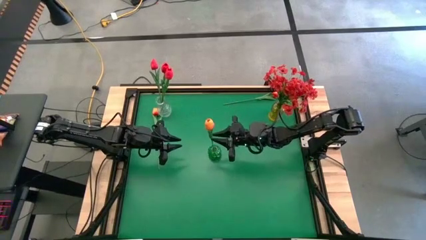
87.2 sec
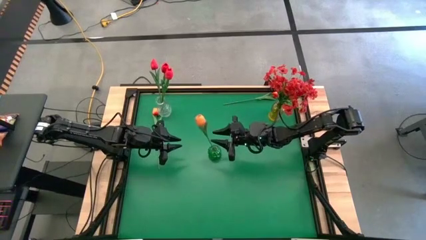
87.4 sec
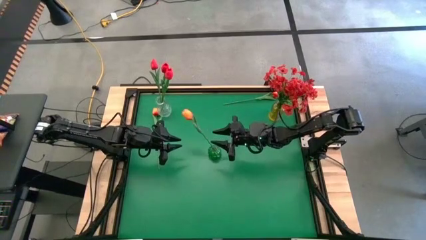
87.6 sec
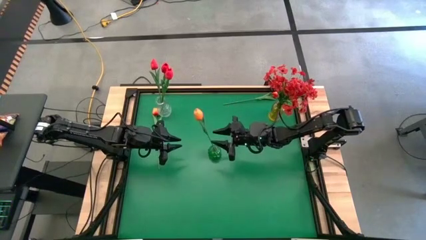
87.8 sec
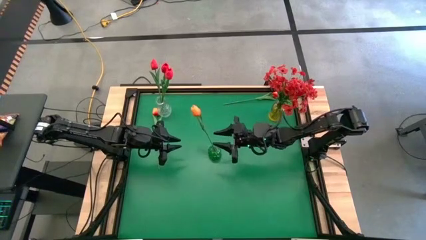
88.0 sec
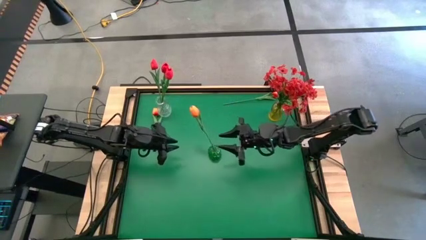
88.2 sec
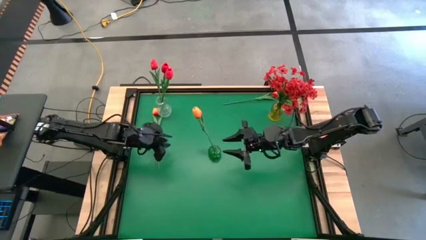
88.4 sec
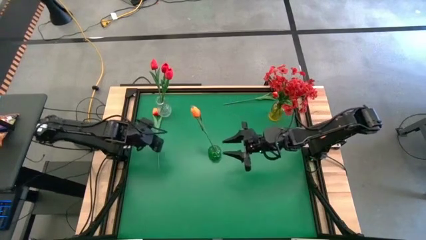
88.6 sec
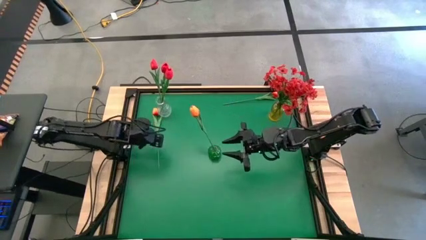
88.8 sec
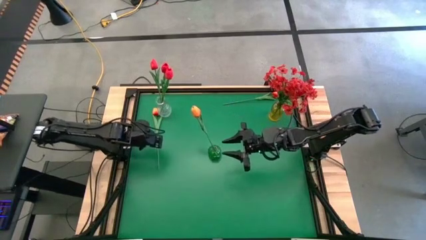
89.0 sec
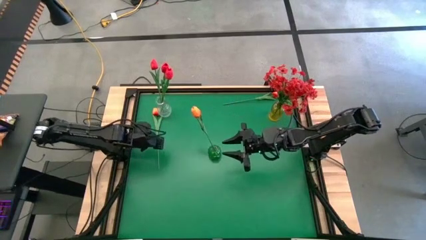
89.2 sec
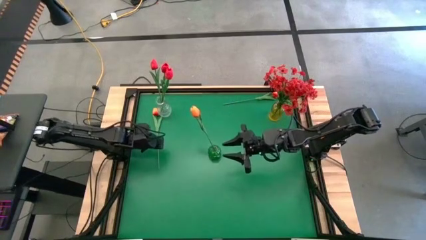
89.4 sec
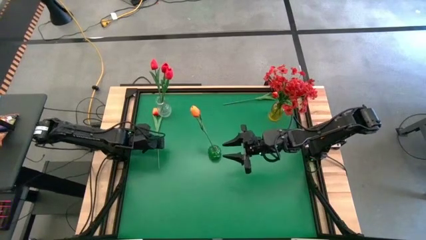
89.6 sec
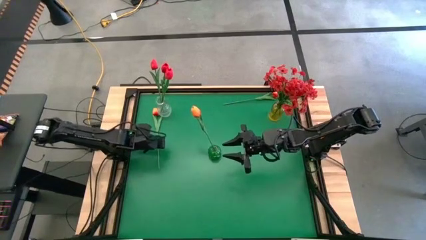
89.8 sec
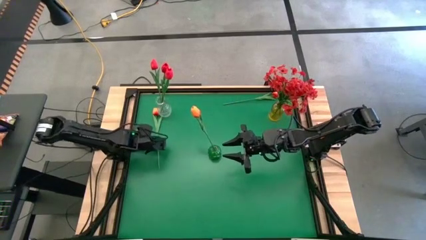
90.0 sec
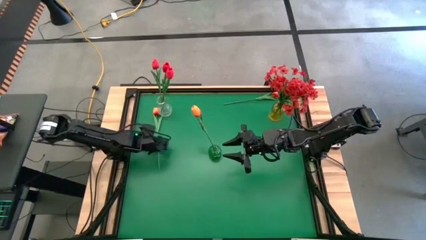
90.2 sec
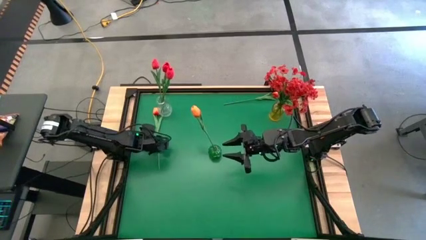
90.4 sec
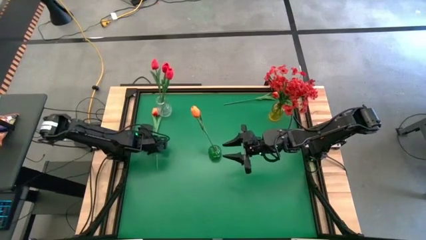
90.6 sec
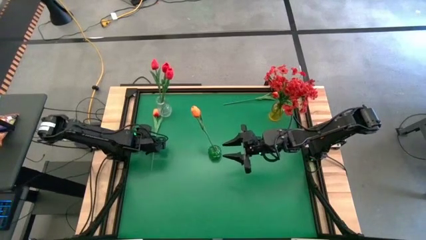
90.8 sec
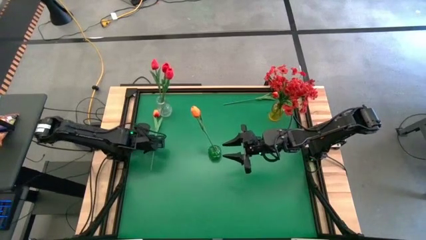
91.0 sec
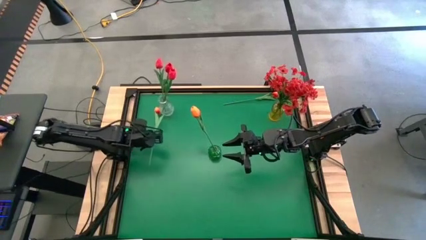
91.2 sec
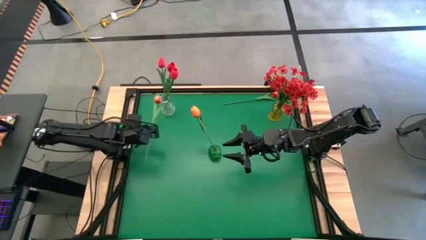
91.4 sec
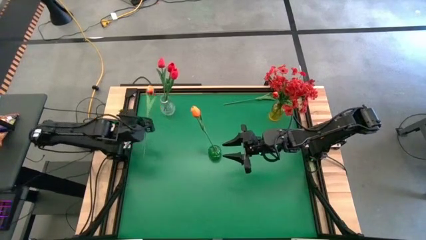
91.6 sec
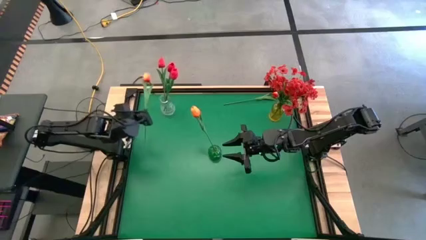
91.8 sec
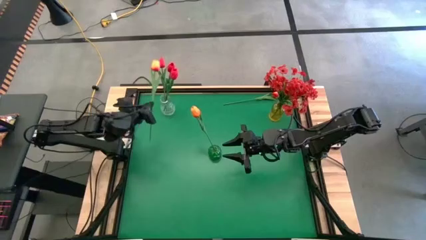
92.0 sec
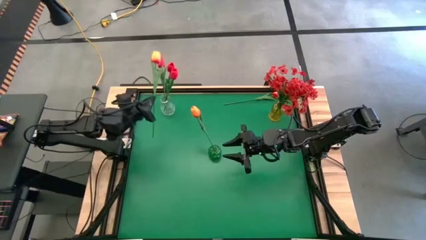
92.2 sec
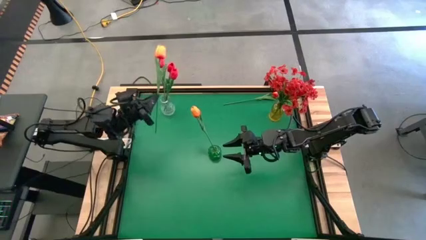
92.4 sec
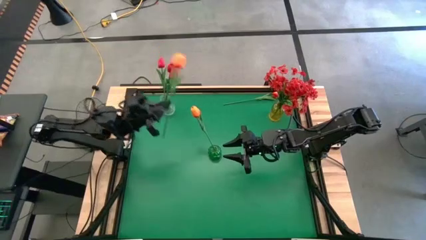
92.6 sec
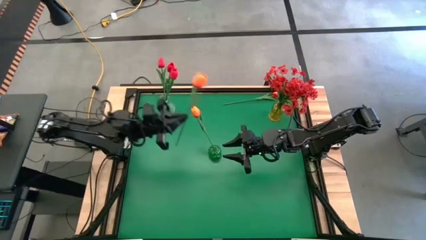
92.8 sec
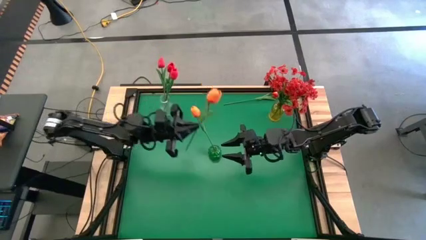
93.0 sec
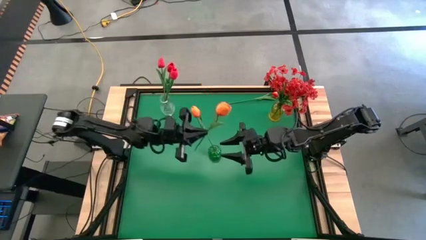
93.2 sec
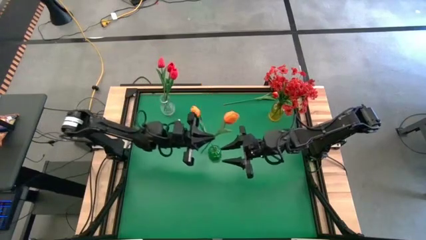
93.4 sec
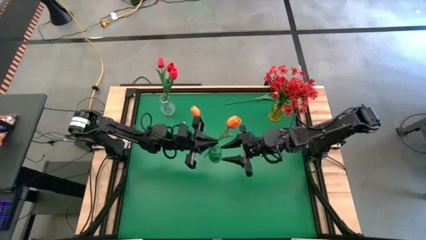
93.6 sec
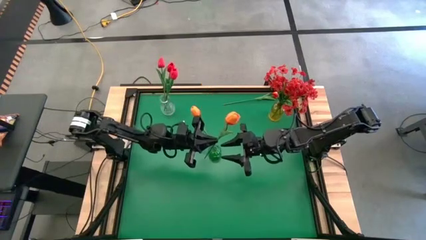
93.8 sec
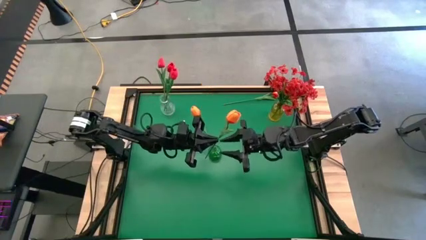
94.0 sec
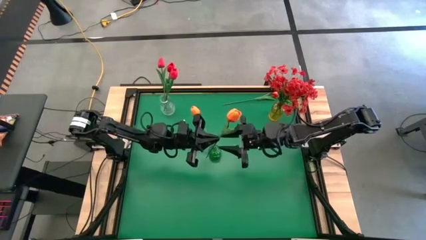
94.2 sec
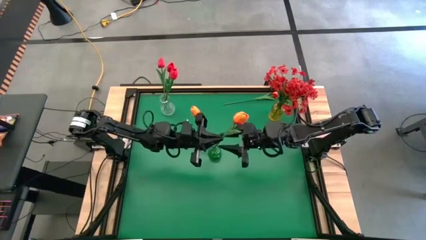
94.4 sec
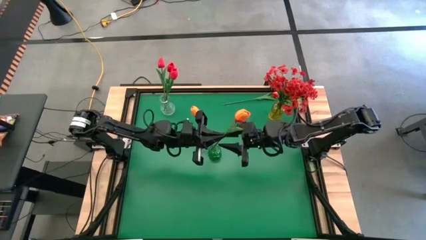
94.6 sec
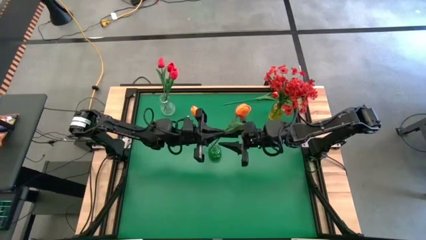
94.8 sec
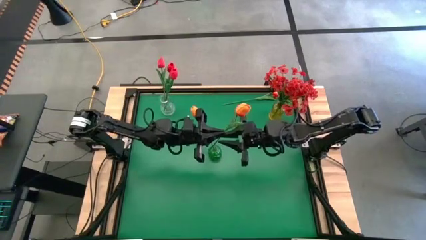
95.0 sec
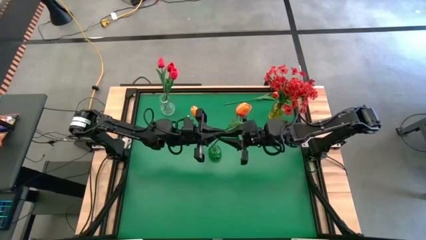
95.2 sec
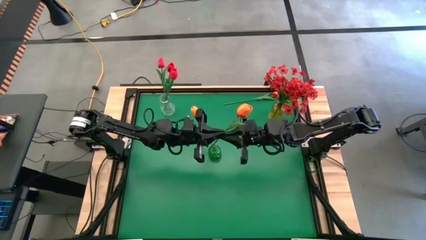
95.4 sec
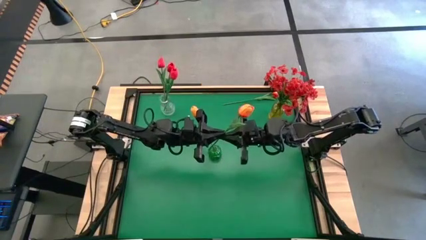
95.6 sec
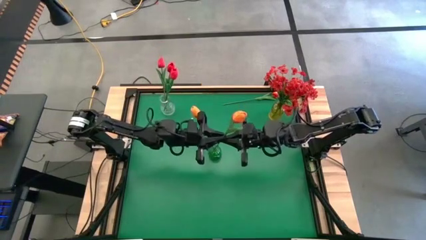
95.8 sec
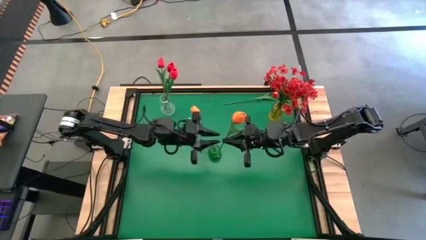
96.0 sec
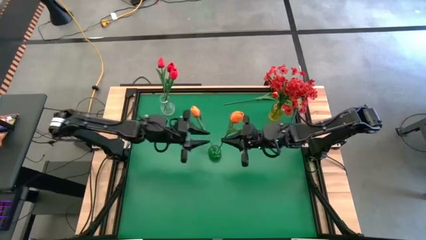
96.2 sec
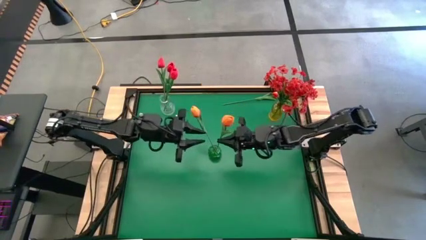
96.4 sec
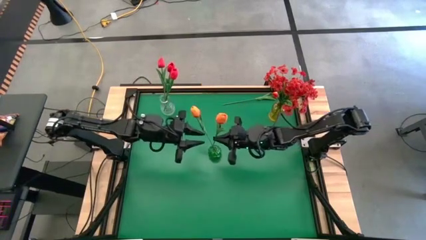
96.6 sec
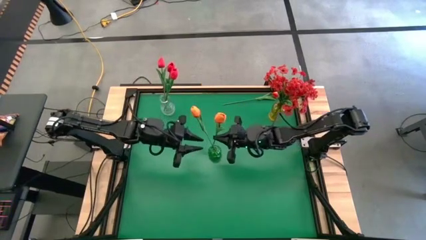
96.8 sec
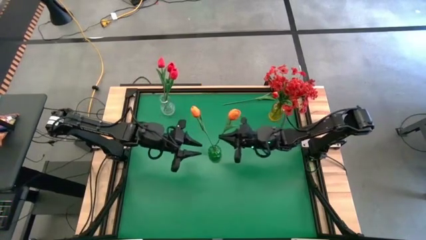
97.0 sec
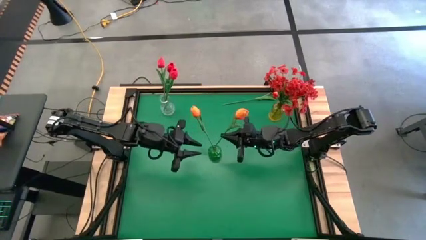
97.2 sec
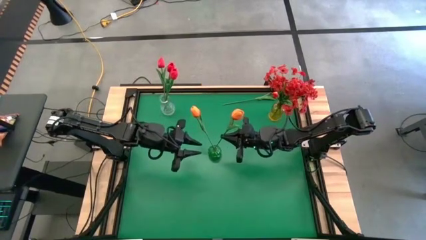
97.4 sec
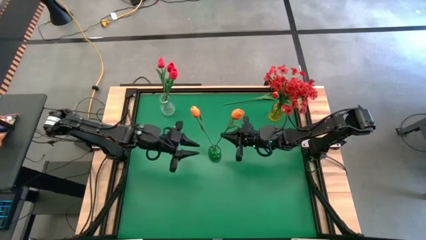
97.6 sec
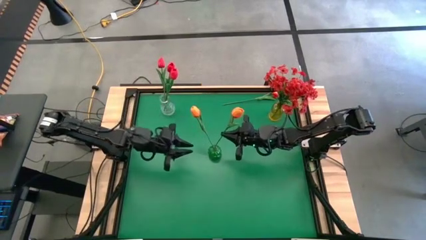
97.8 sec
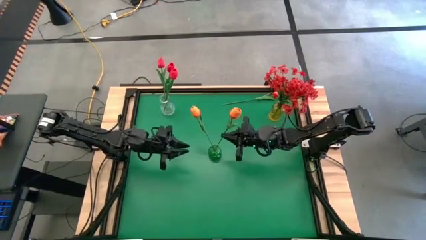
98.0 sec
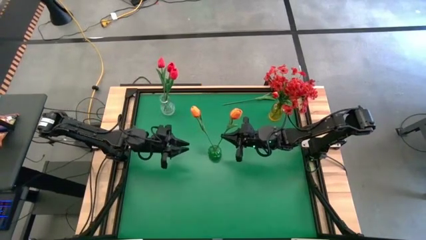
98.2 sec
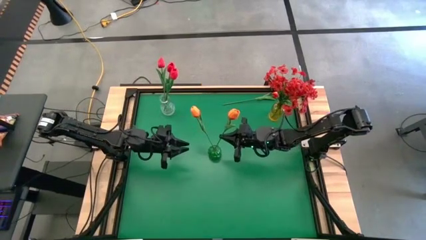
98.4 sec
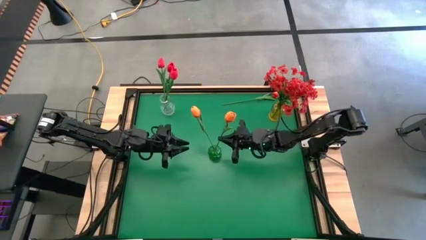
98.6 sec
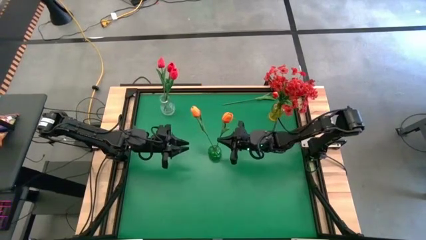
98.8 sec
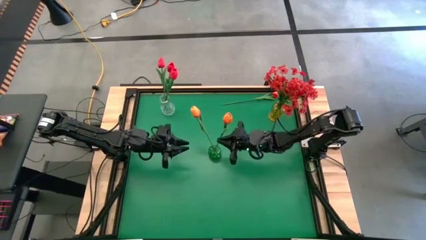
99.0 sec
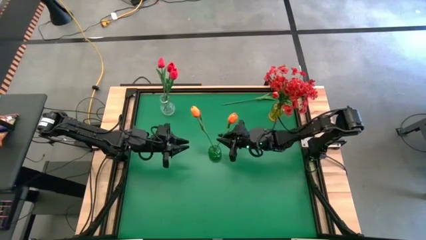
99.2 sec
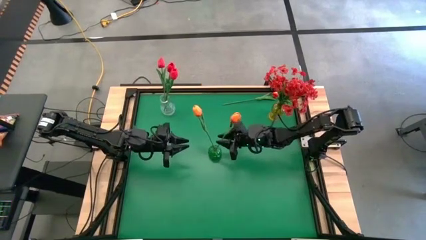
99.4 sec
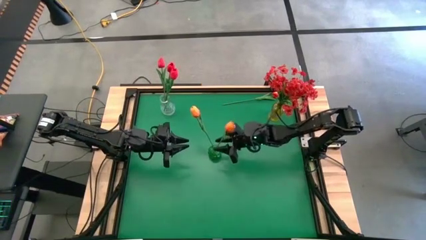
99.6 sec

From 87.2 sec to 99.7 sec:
Task: Sort flowers into vase by color
Put the left orange tulip into the green vase

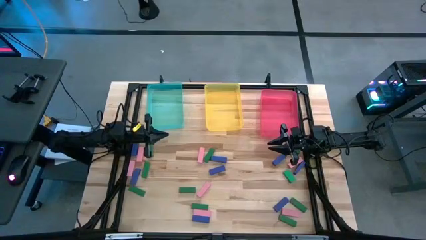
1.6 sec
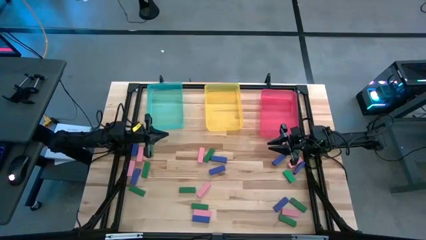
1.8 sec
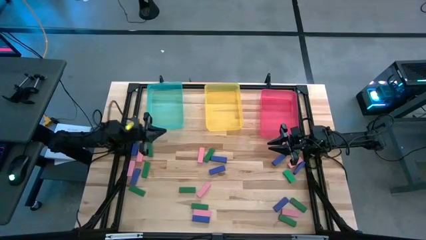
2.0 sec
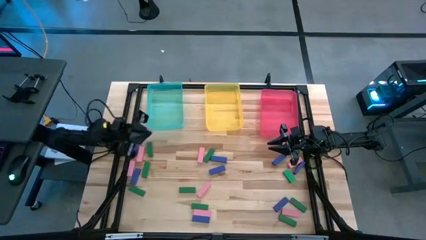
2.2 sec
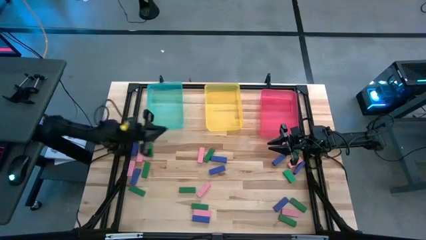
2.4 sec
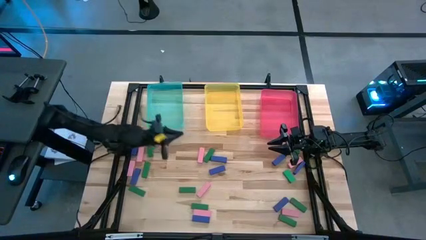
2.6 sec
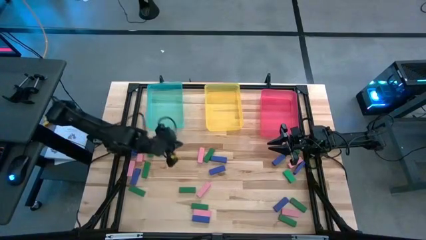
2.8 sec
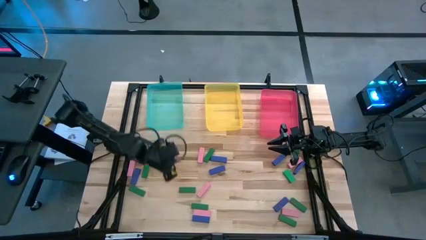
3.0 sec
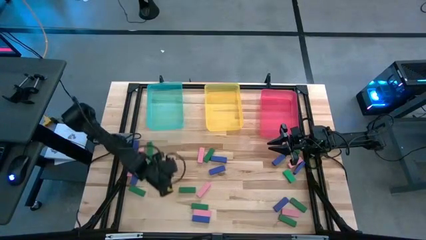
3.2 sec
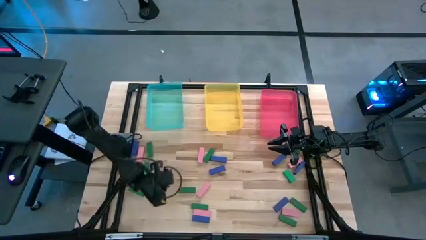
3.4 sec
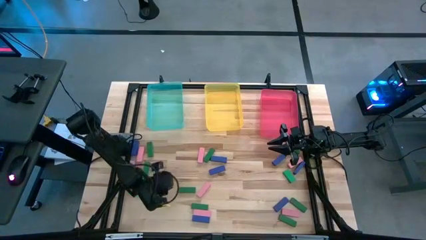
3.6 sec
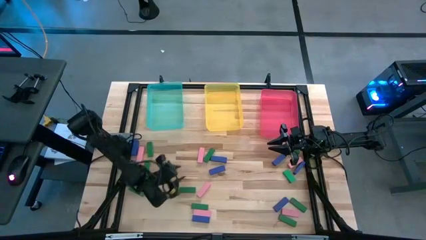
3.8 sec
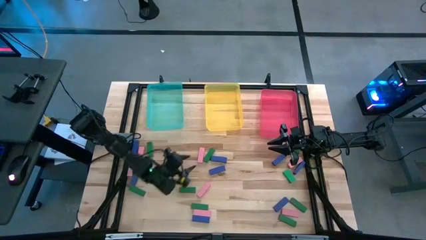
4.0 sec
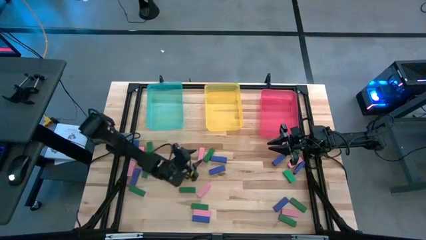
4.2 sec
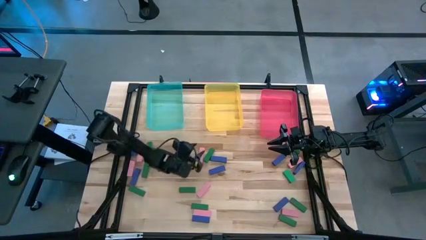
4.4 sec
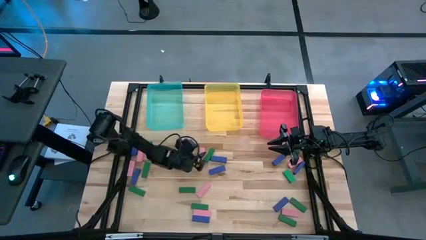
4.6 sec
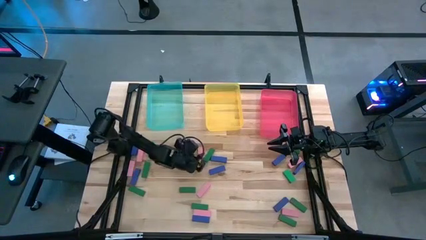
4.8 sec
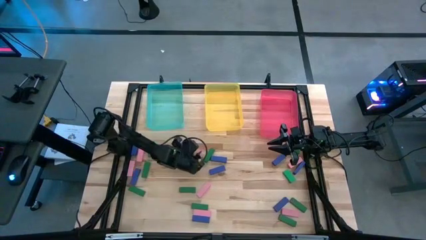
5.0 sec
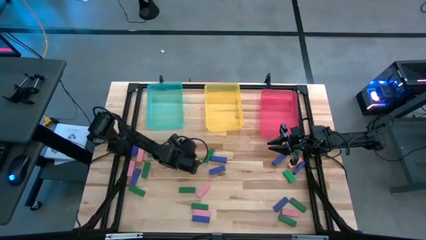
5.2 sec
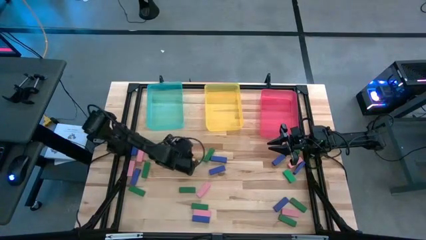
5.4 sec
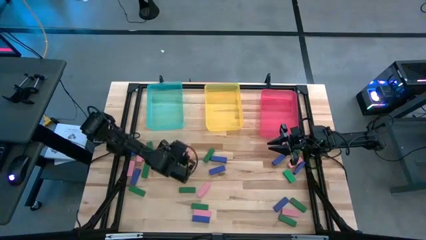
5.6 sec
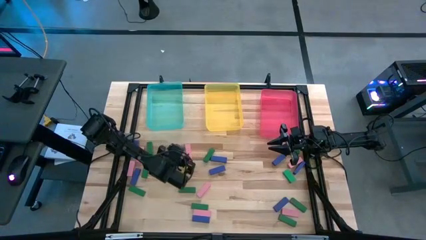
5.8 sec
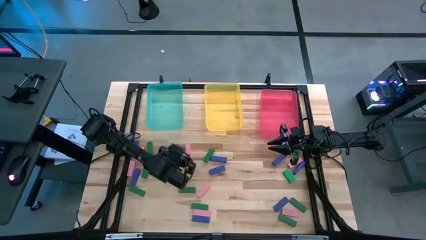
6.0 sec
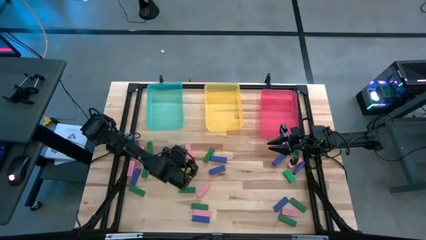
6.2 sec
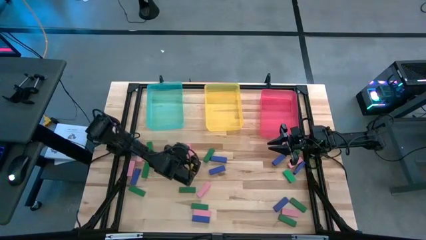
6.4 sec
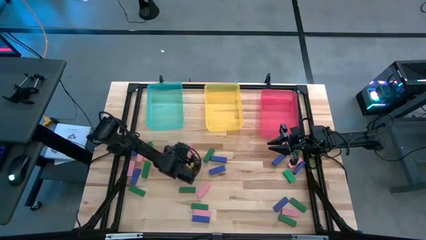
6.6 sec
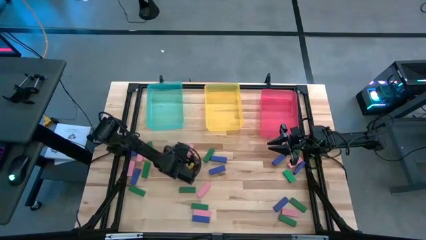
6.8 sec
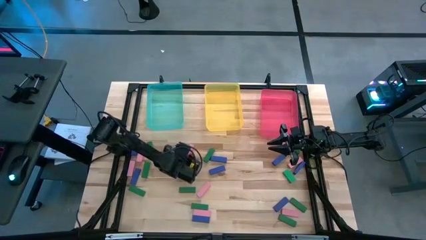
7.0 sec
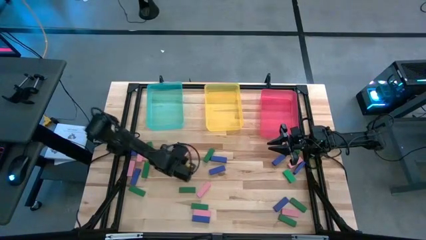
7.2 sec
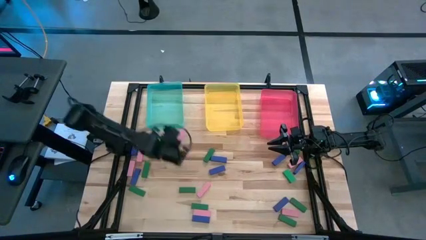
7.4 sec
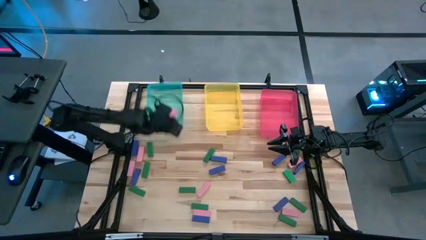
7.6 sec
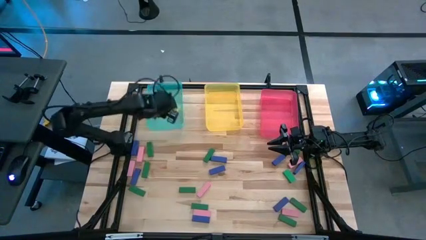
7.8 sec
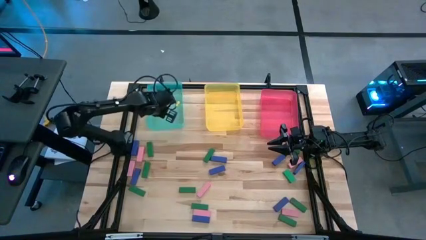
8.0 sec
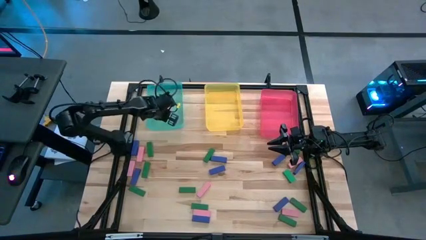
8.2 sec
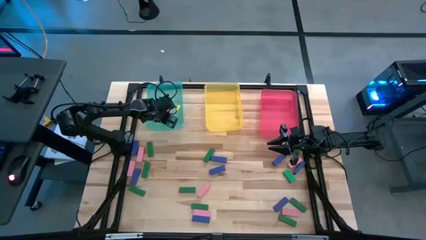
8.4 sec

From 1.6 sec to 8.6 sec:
Task: Sort blocks
Put the pink wooden block into the blue bin
